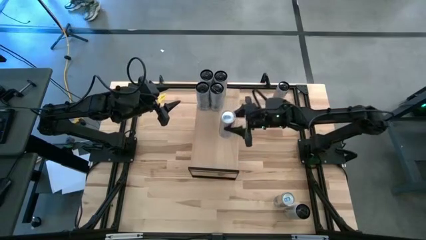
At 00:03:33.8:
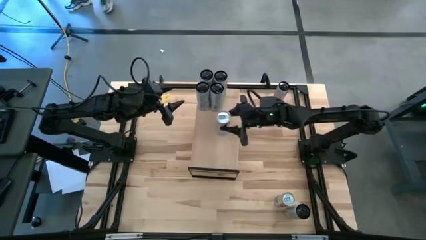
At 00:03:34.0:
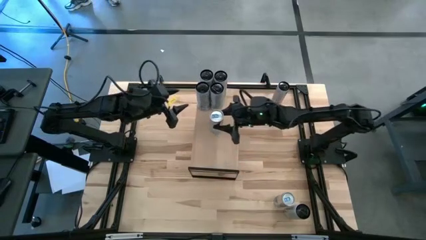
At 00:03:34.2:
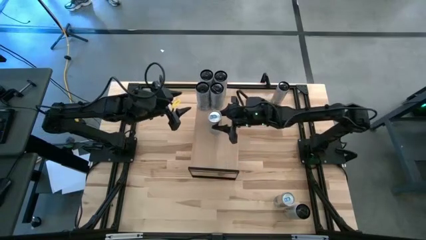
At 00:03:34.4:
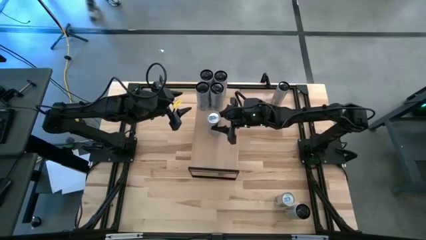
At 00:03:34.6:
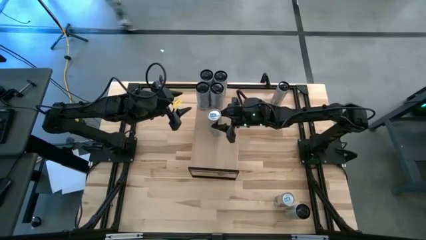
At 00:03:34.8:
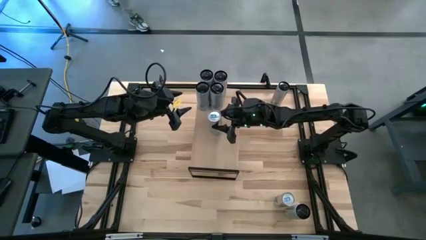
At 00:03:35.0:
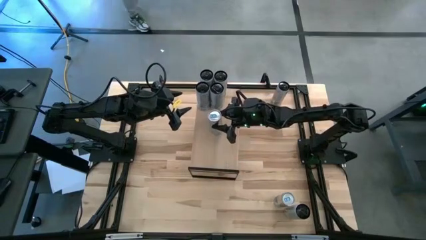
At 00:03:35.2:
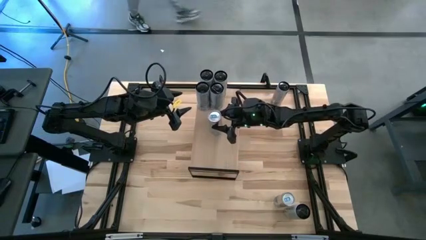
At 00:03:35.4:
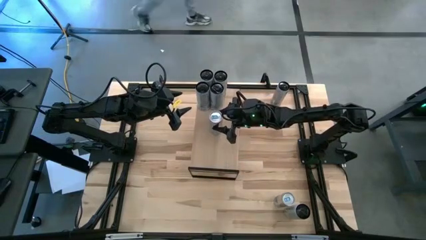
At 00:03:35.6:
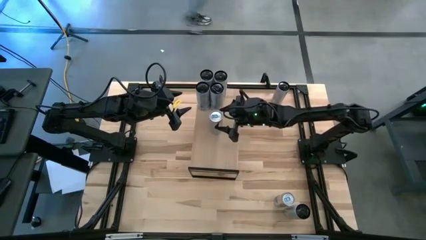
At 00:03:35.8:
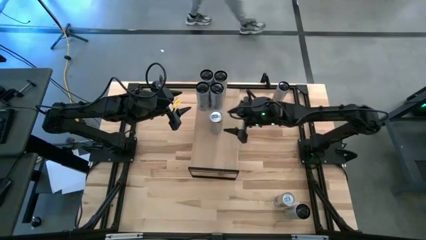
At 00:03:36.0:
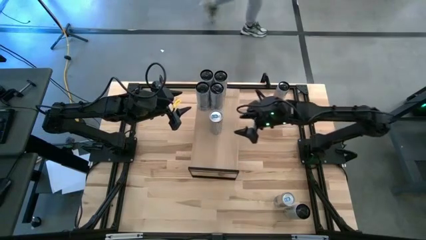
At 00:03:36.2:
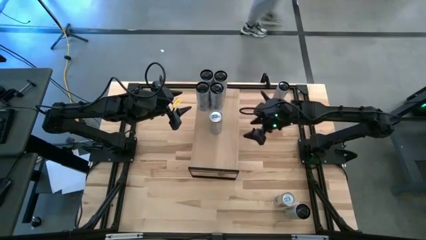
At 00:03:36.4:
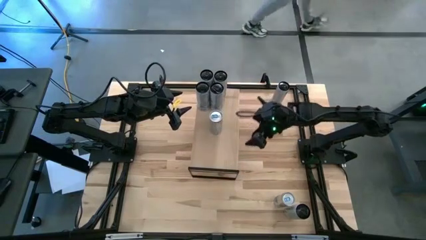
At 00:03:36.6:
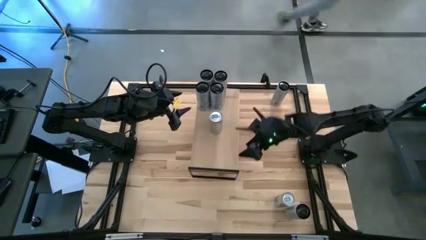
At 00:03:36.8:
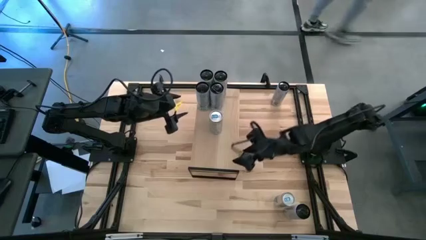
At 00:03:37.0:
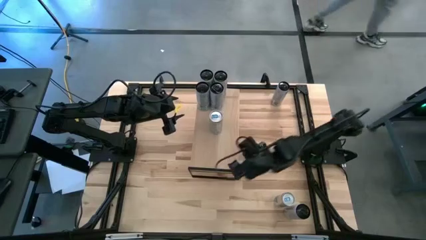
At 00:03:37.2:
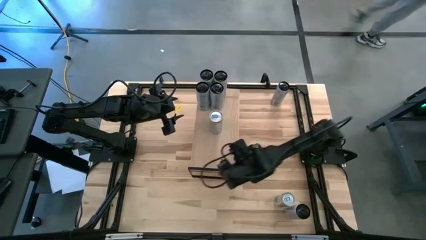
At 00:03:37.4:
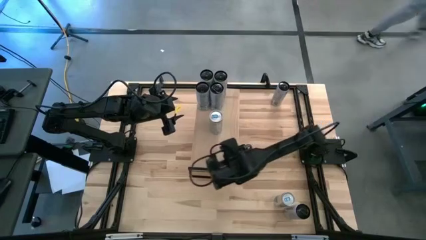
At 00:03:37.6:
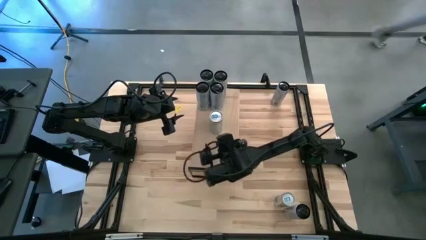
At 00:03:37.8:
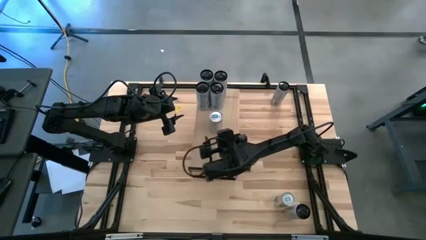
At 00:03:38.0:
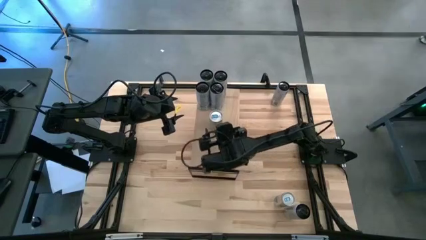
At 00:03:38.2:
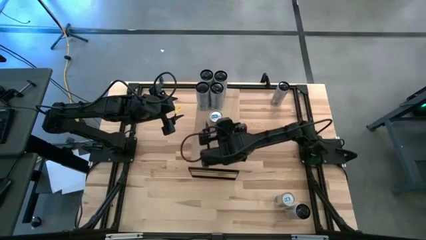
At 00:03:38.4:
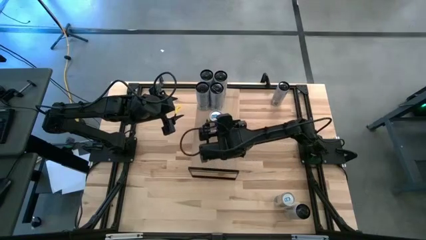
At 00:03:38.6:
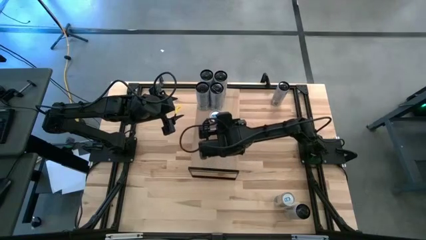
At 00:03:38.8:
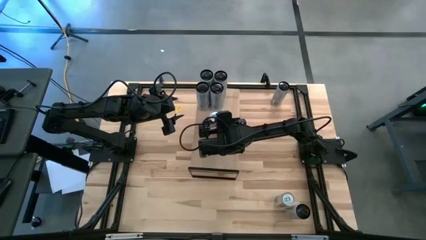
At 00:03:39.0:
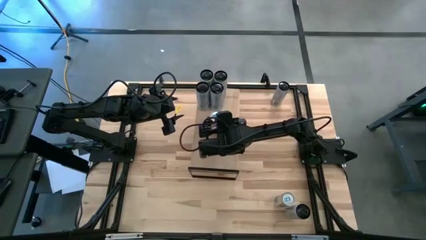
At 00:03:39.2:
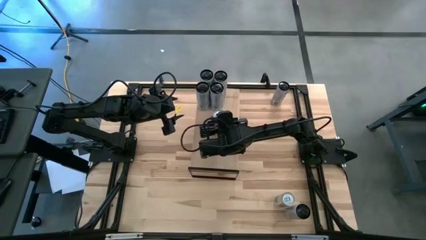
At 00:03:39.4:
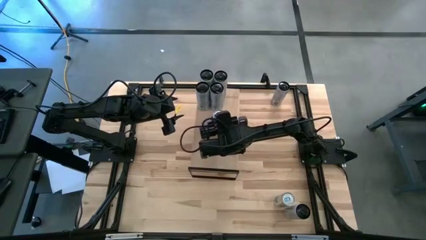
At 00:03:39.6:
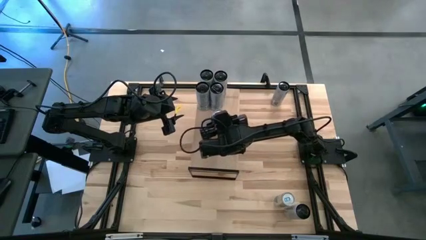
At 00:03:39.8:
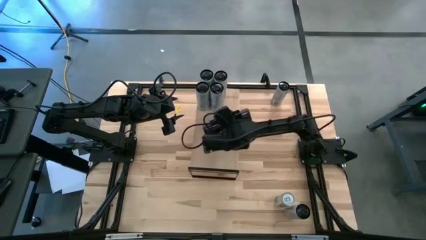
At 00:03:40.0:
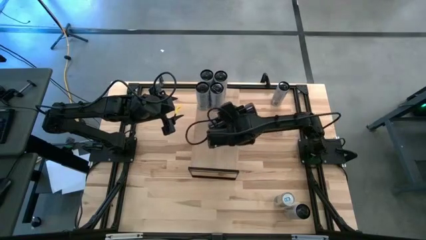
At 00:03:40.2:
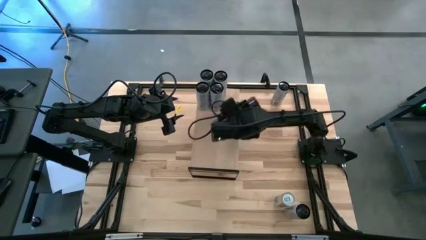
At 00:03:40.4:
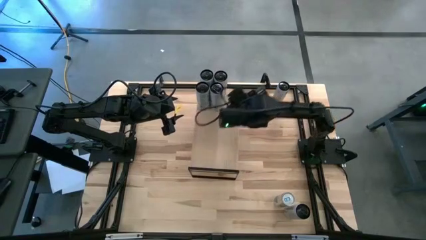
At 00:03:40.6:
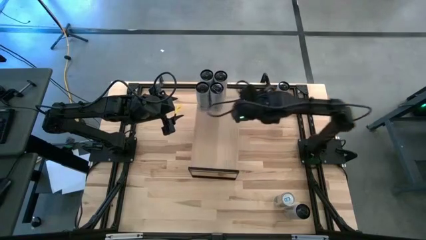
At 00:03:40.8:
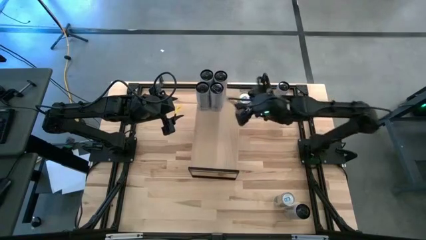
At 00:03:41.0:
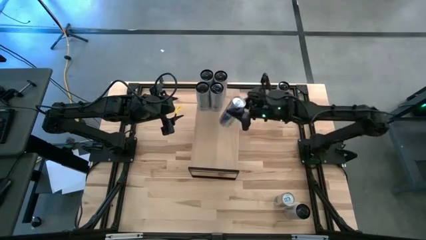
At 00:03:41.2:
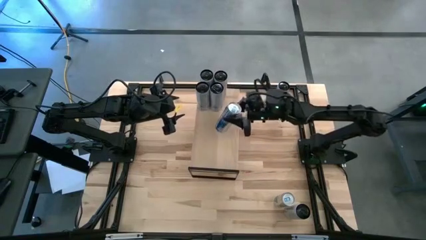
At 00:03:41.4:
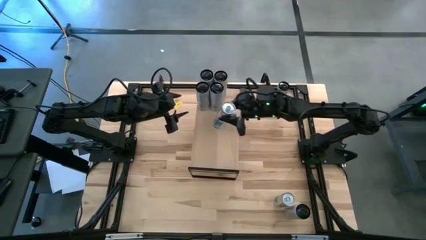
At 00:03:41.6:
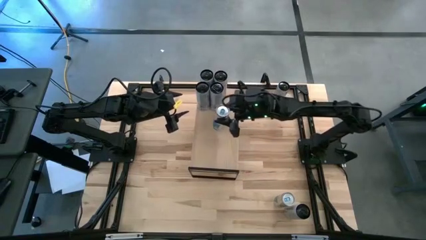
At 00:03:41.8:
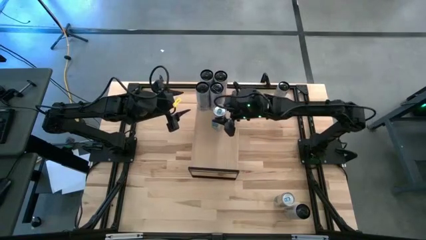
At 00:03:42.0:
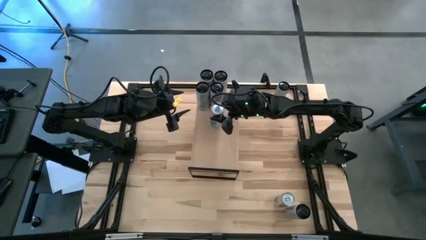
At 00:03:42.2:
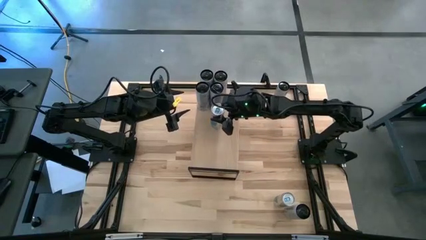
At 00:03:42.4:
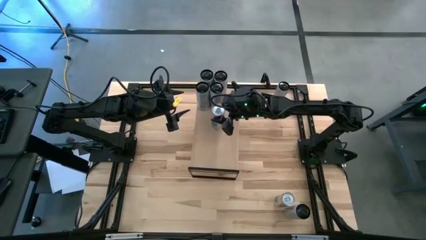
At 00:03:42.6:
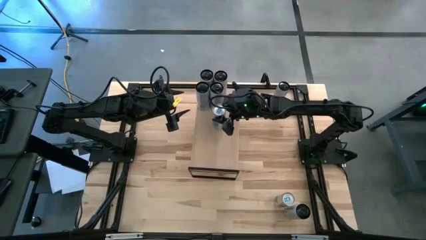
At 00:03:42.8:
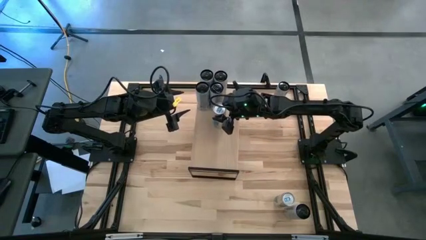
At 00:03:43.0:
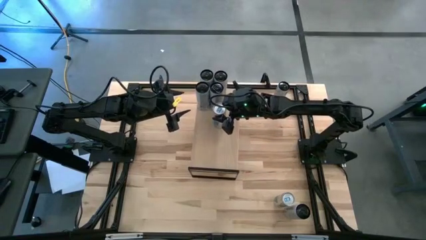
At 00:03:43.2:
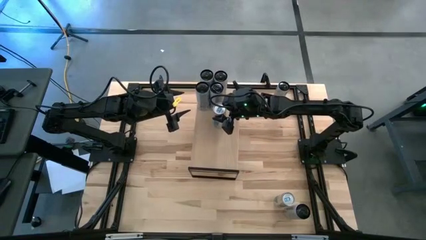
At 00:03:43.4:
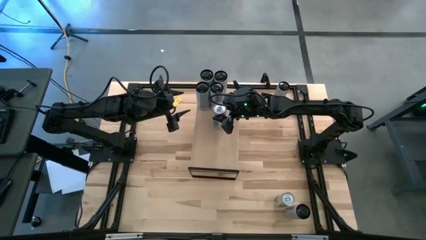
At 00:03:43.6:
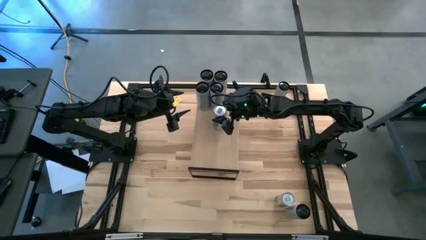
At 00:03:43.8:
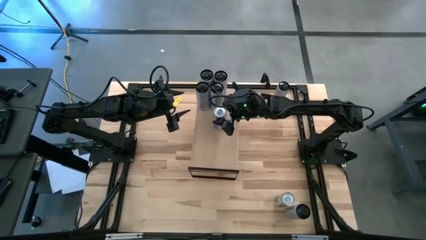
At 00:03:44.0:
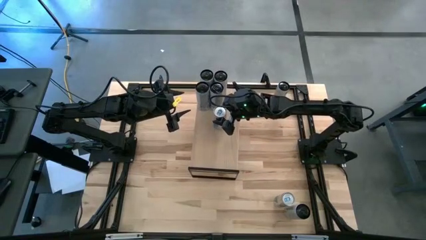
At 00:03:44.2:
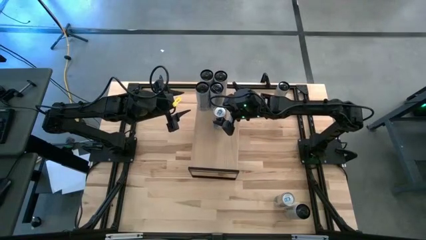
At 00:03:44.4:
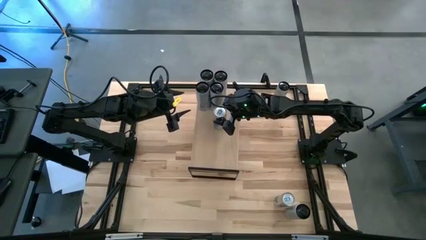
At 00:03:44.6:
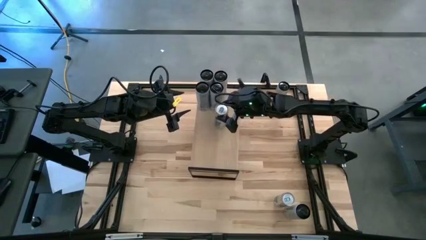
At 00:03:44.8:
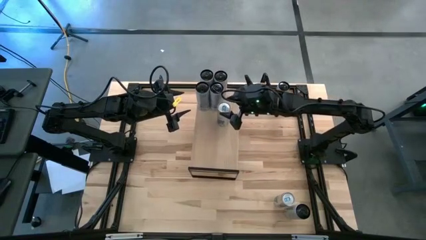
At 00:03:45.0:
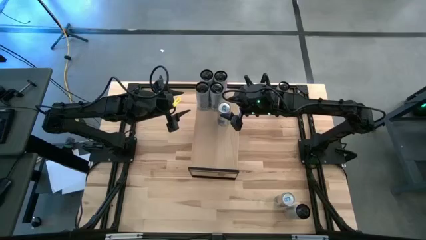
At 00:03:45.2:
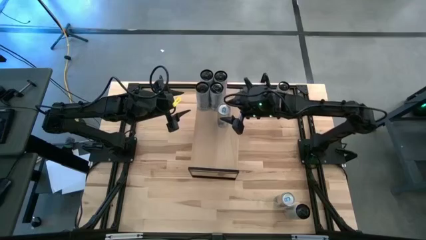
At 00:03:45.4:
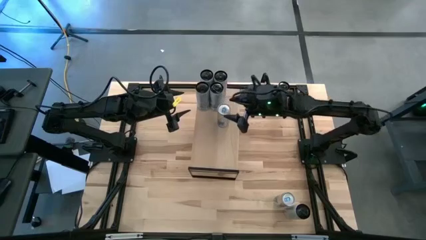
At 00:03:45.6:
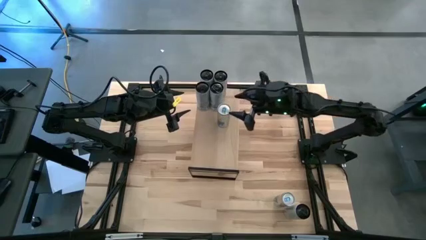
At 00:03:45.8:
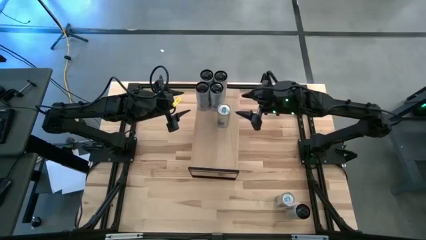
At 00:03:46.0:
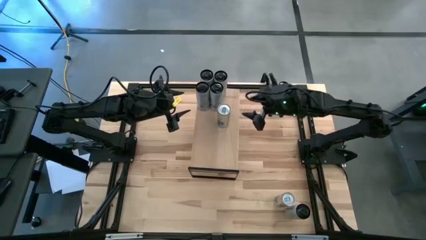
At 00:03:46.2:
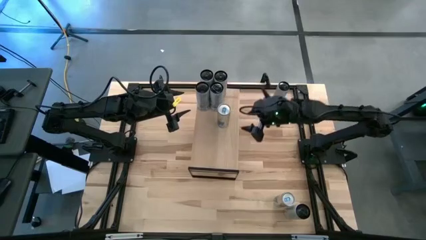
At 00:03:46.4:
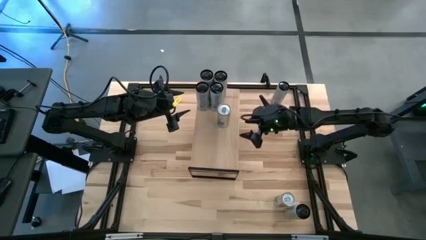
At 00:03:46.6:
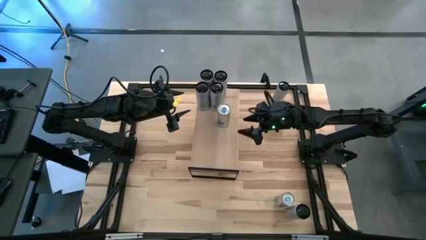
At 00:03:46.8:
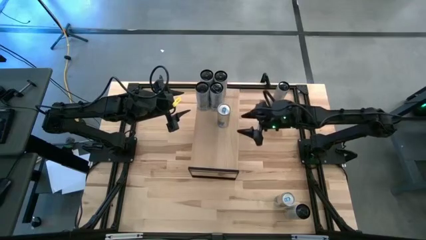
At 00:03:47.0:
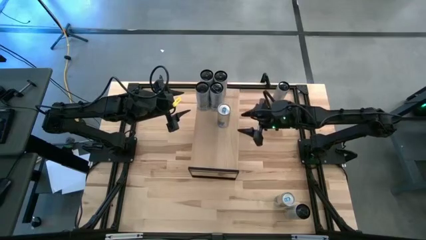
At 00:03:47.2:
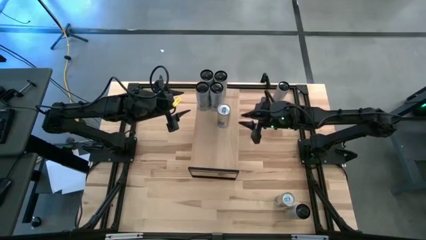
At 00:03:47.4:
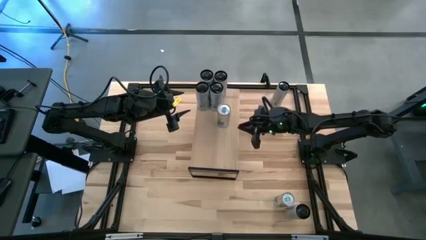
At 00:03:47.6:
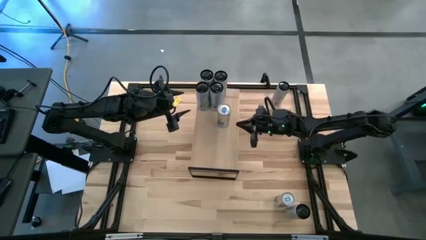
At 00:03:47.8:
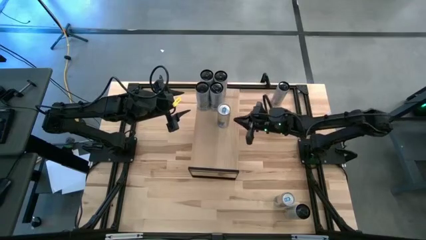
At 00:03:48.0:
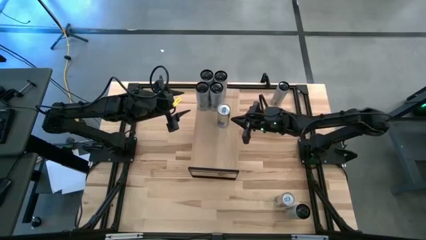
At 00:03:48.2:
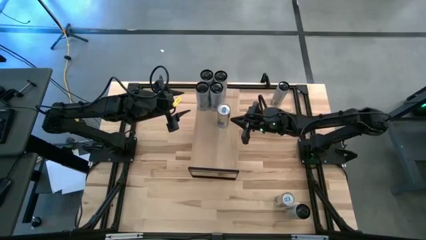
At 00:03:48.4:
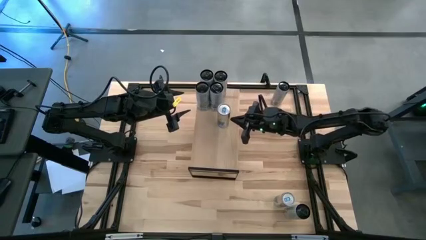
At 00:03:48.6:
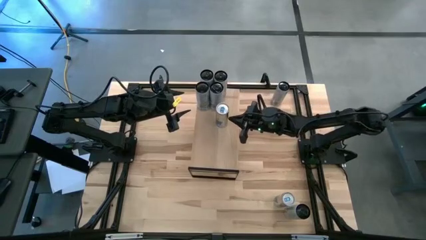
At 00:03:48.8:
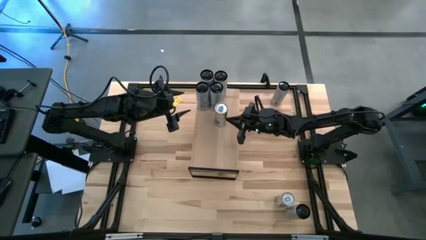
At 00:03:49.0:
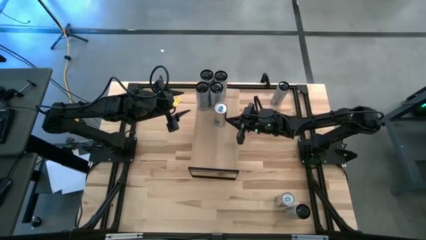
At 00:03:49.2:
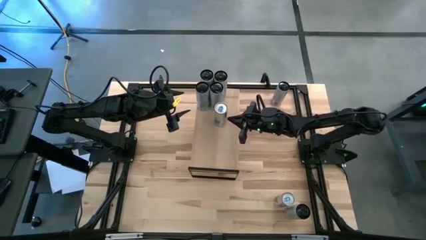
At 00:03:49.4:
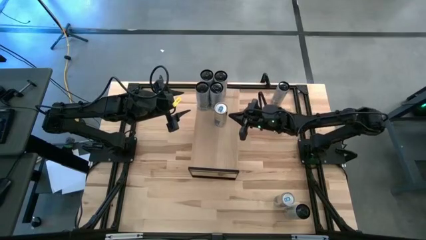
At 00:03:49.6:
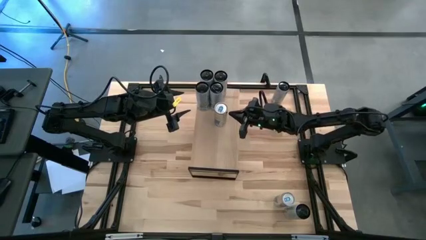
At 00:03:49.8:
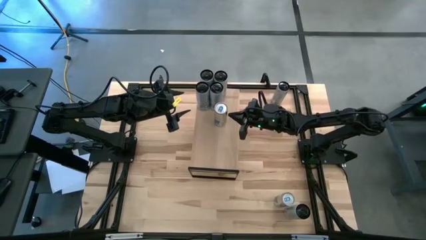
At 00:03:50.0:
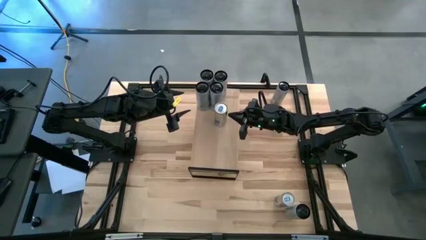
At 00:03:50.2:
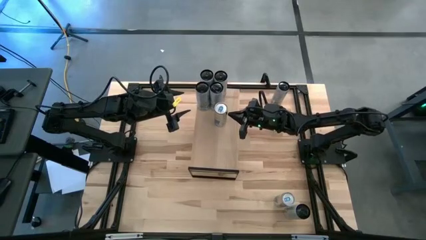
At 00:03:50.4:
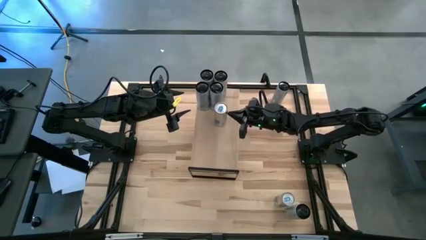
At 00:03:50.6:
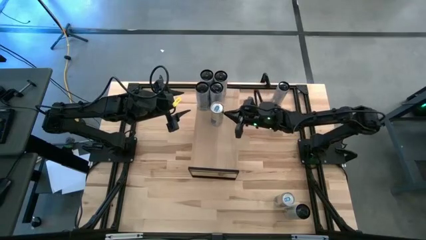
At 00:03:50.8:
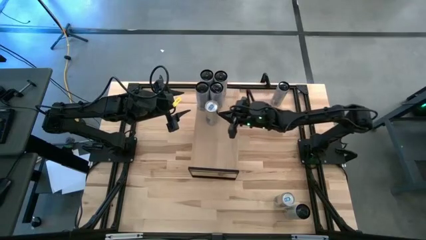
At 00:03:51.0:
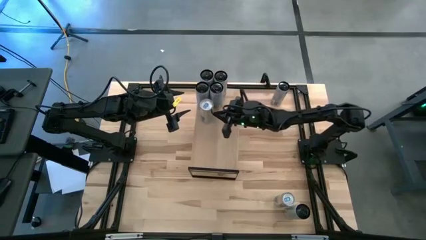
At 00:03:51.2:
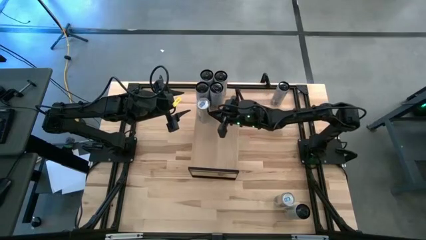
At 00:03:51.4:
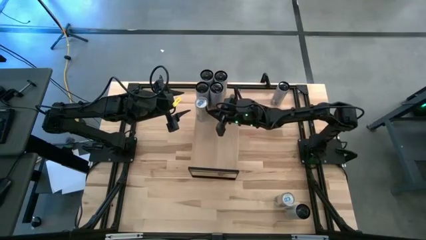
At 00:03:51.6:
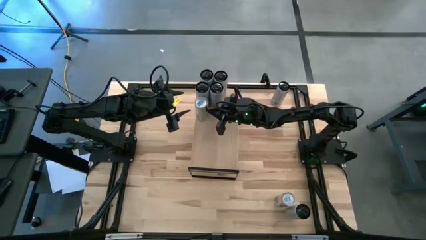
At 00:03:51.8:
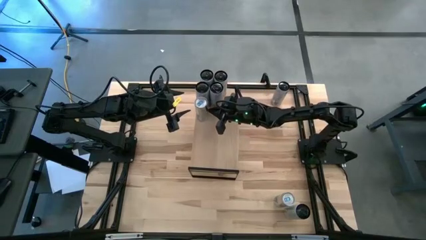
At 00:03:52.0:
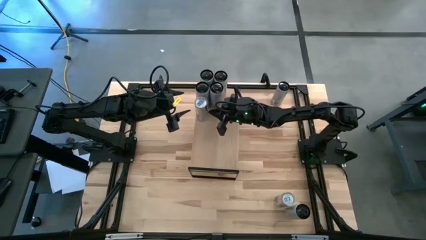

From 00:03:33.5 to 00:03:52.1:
Task: Place canned beverage on shelf
Put the top blue soda can on the shelf
